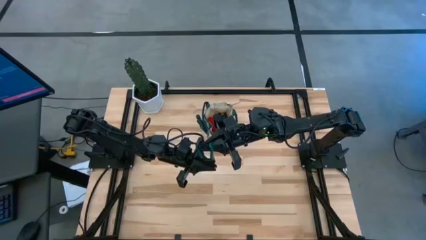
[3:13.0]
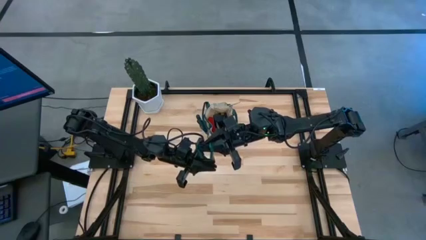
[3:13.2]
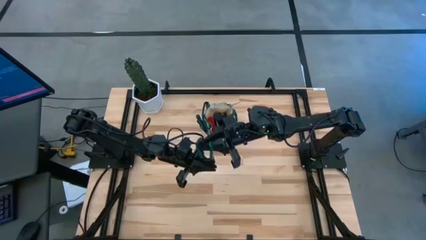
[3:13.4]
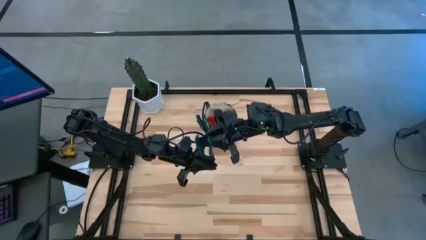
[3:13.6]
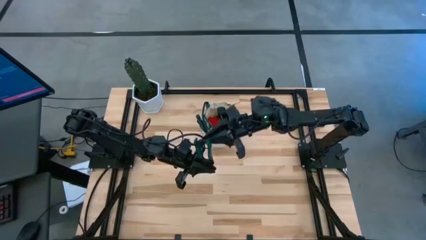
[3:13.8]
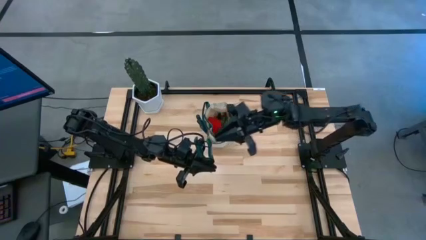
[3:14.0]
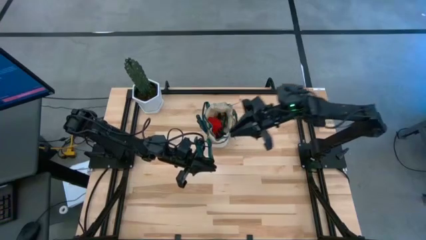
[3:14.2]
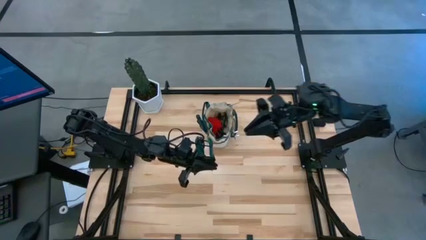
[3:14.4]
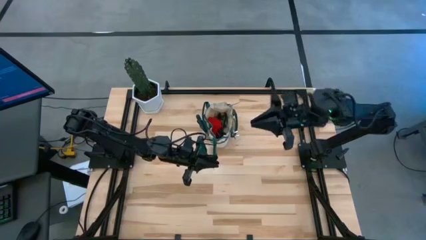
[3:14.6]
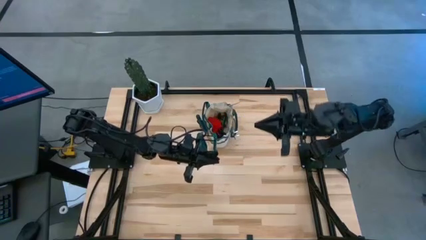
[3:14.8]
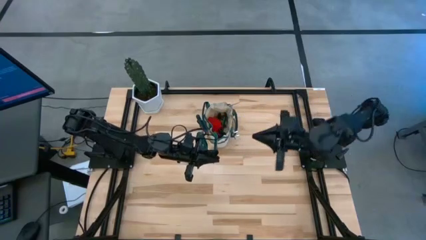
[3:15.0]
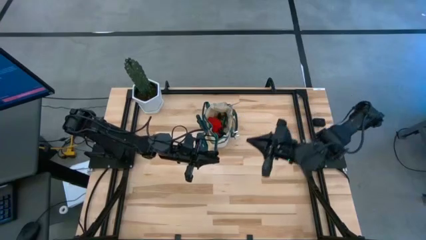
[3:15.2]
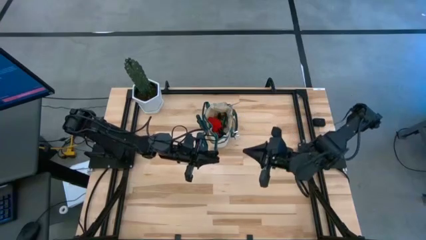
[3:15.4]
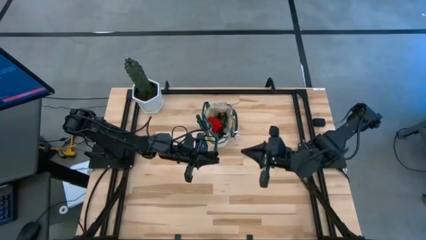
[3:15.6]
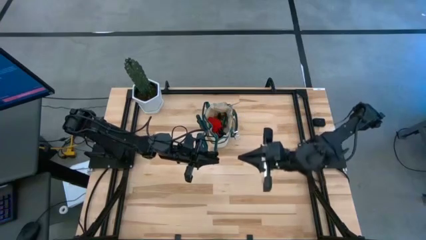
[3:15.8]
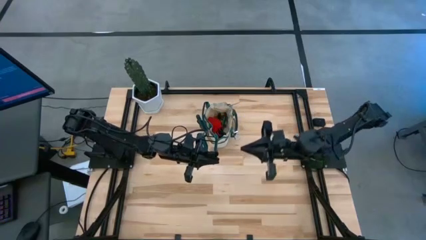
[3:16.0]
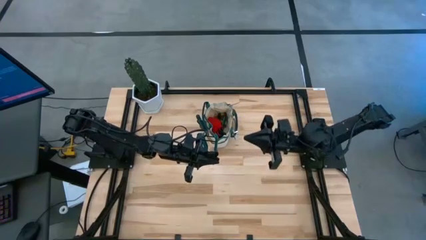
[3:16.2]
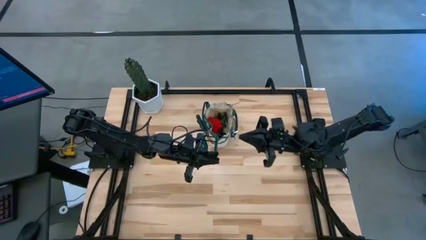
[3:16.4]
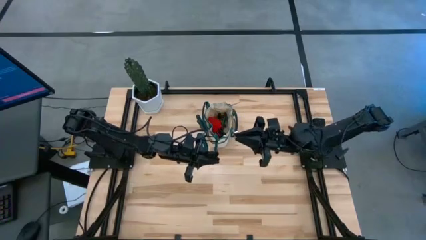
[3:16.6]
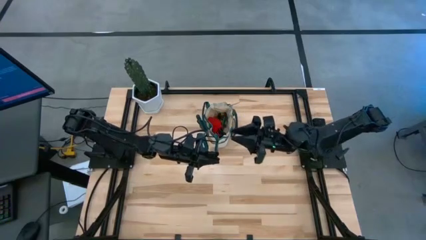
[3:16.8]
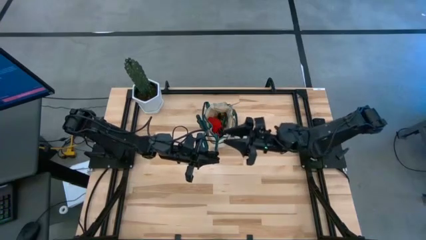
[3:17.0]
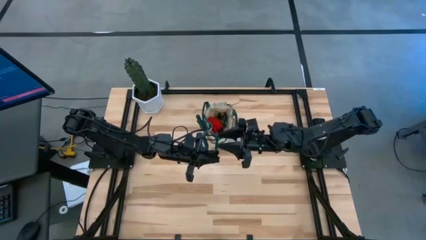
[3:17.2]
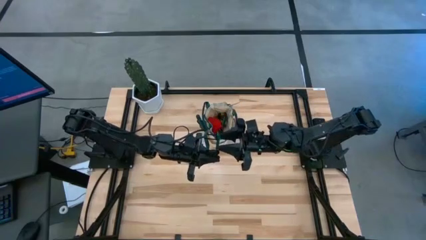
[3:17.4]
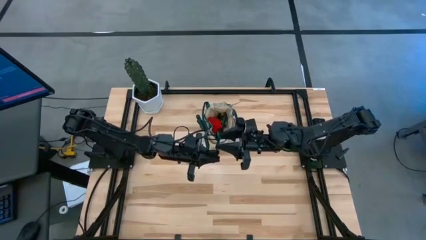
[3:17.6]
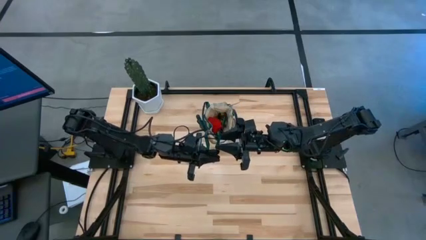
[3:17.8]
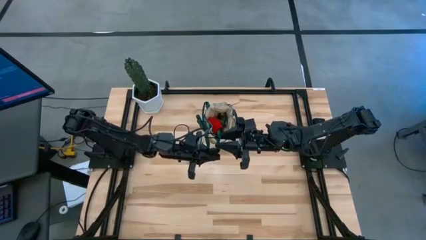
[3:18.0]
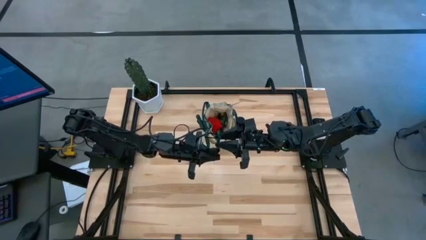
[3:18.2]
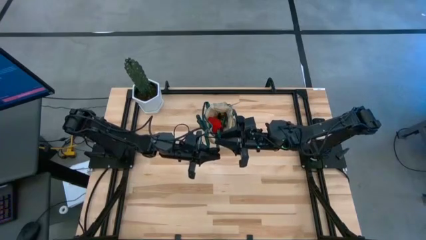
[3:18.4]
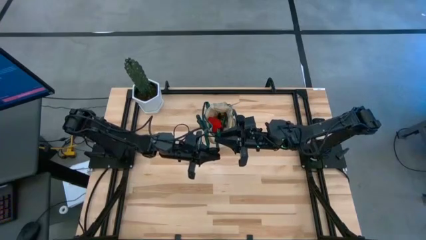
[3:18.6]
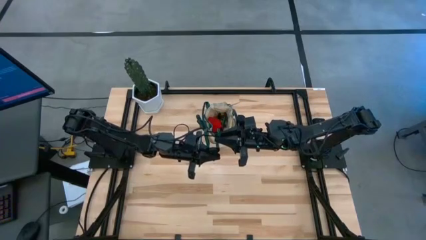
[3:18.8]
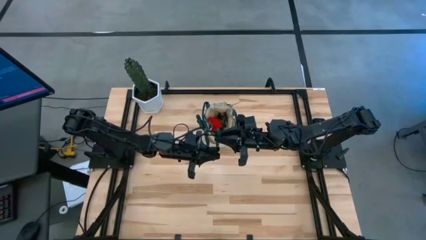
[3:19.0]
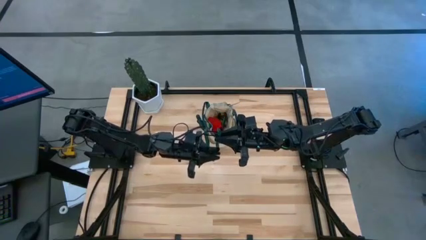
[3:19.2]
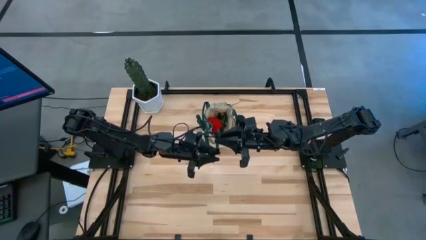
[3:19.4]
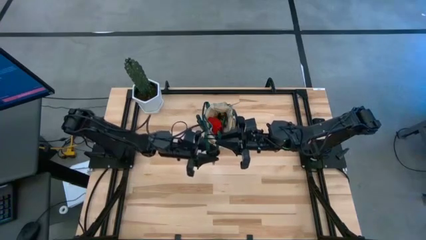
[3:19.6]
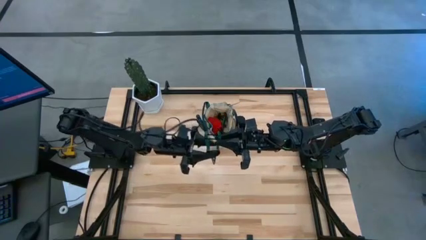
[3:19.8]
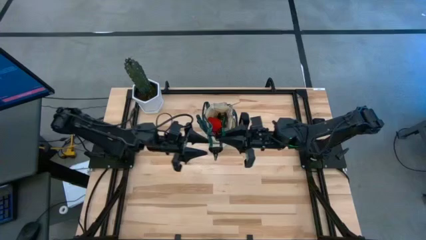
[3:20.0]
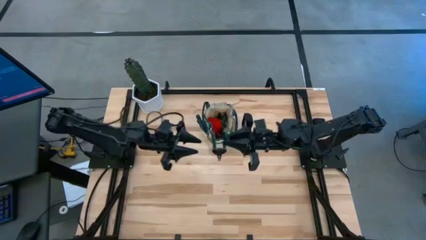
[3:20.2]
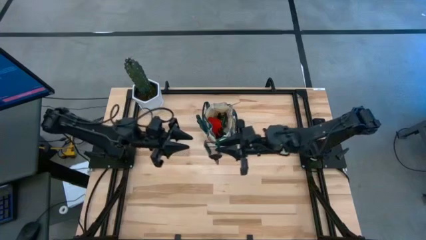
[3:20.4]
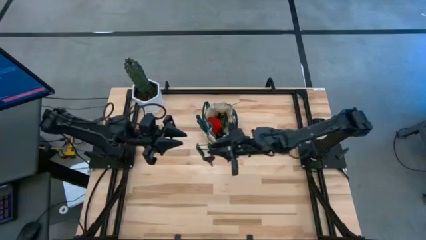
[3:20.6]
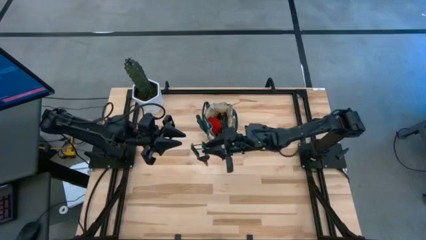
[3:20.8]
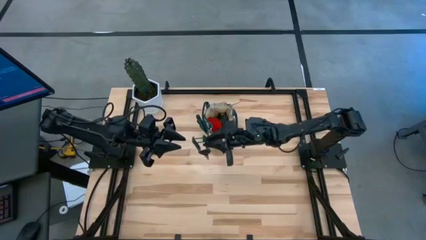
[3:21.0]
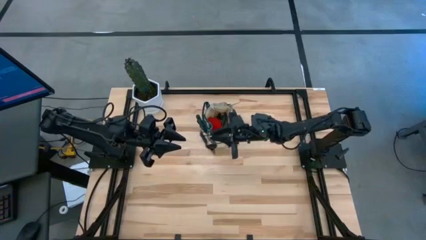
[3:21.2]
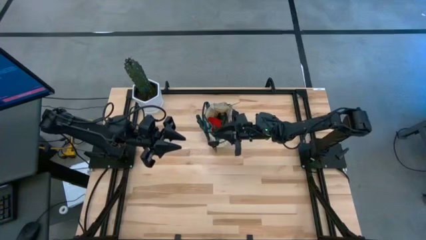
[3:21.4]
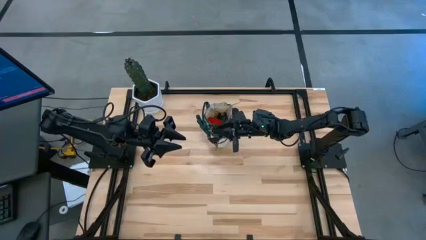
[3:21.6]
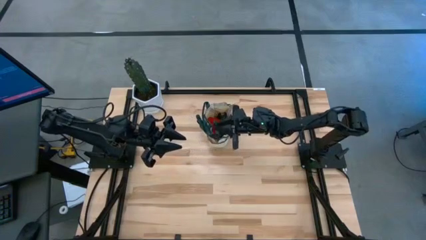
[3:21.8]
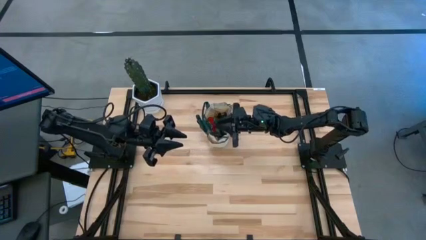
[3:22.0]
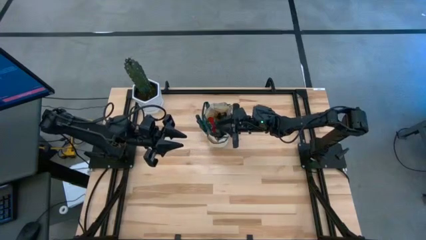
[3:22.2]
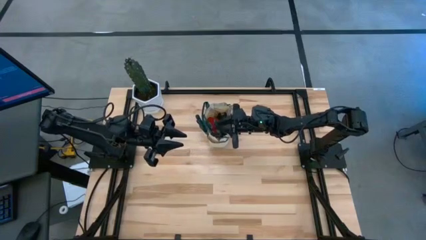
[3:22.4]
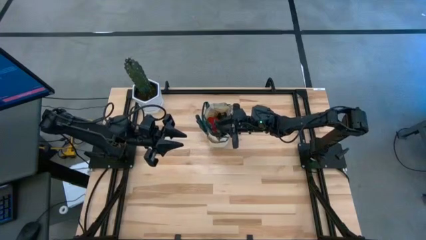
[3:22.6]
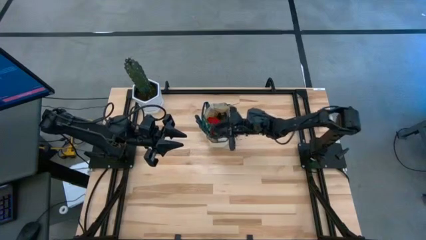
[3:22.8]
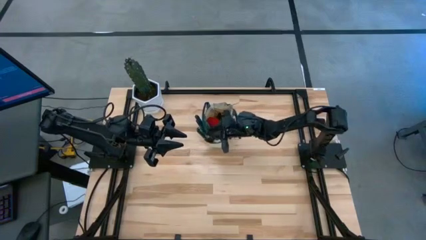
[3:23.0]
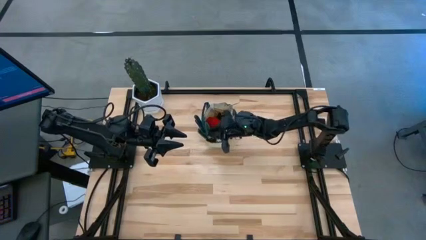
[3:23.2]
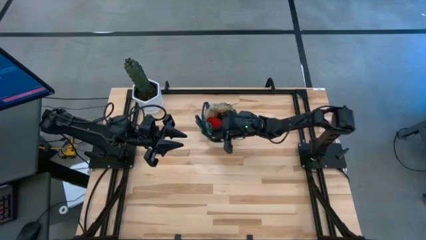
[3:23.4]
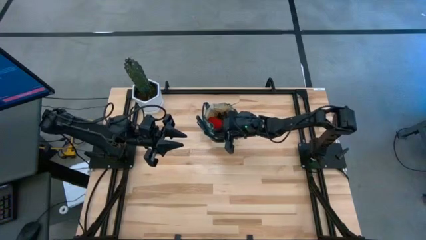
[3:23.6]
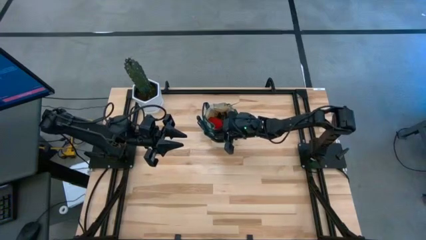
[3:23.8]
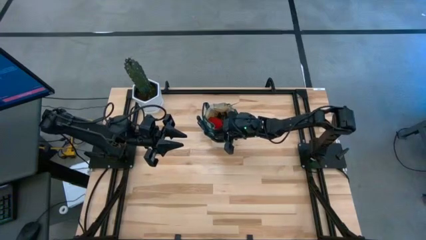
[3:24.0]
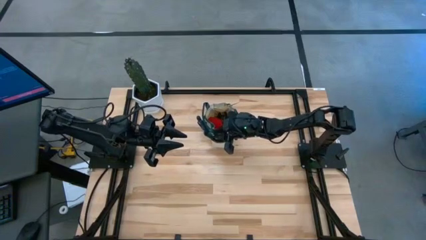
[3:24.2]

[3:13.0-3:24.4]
Task: Pick & Place Garden tools in Gardening bag
Put the garden pruner into the side pocket of the gardening bag
